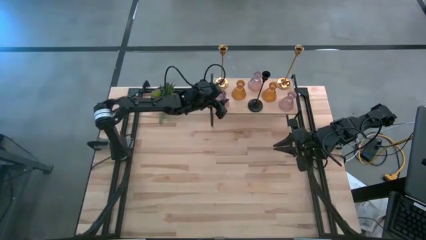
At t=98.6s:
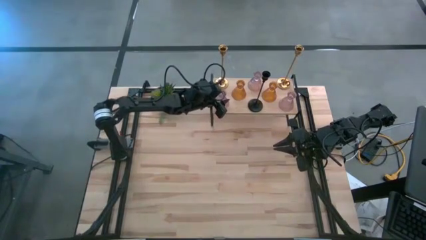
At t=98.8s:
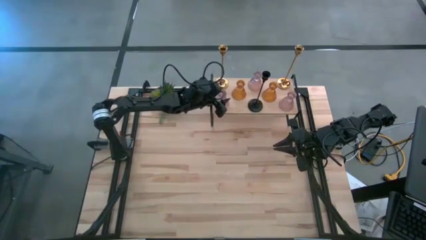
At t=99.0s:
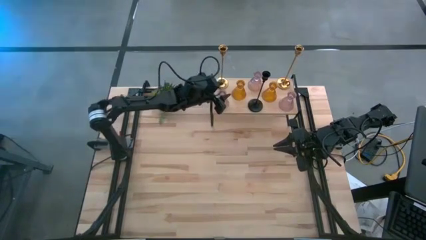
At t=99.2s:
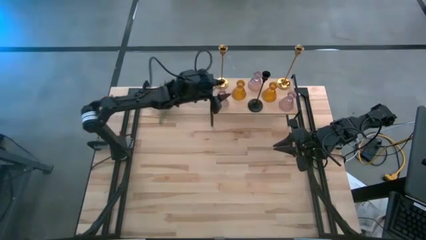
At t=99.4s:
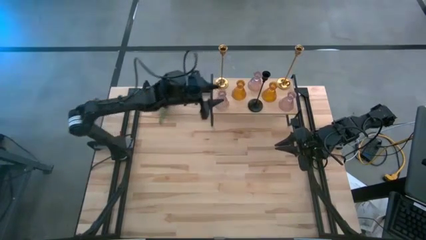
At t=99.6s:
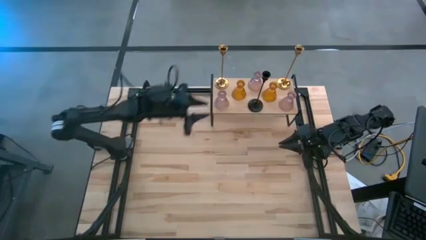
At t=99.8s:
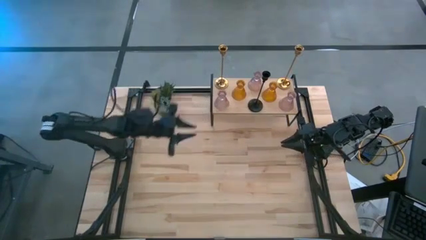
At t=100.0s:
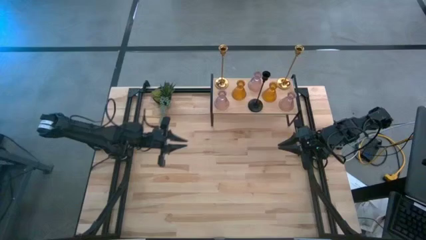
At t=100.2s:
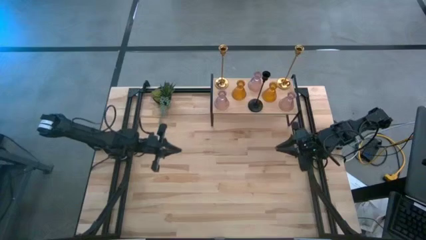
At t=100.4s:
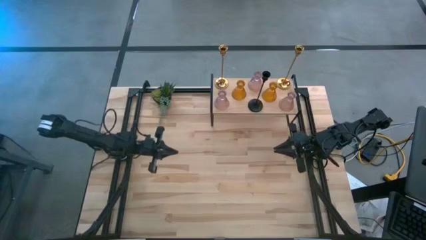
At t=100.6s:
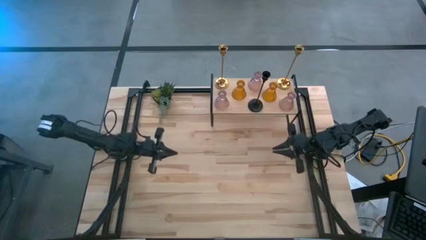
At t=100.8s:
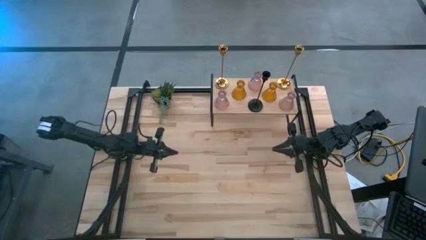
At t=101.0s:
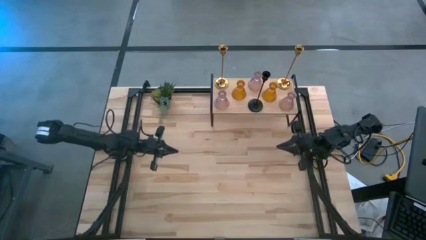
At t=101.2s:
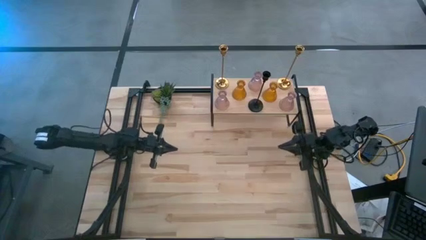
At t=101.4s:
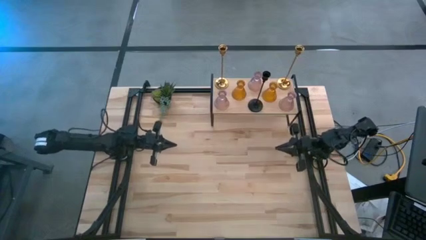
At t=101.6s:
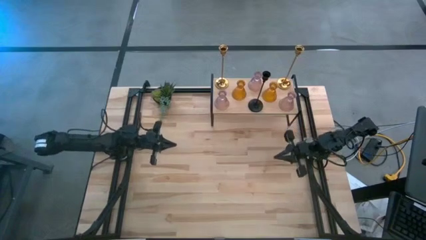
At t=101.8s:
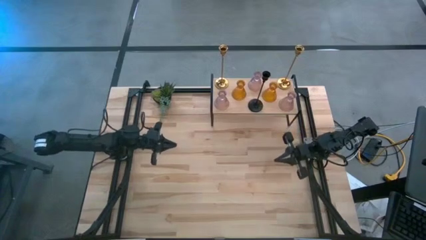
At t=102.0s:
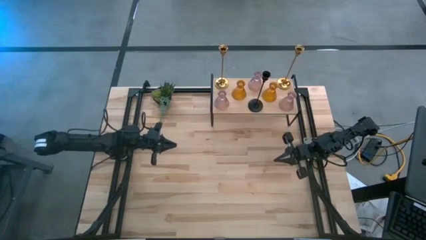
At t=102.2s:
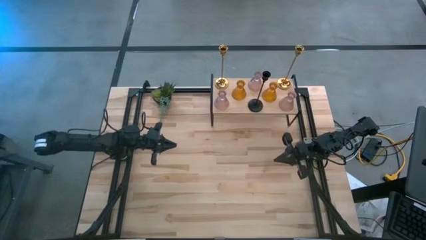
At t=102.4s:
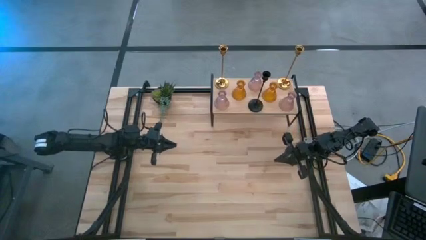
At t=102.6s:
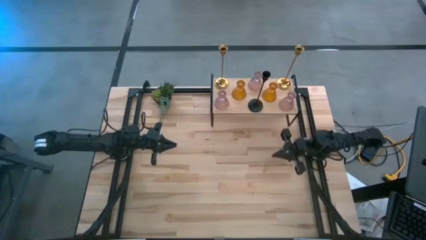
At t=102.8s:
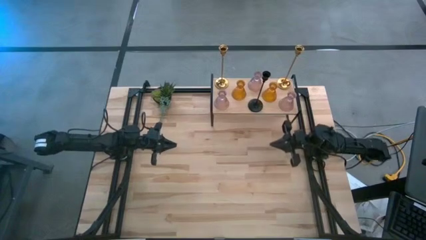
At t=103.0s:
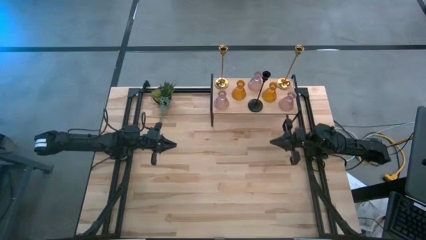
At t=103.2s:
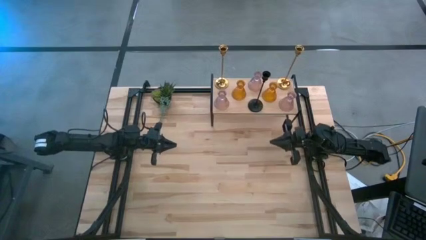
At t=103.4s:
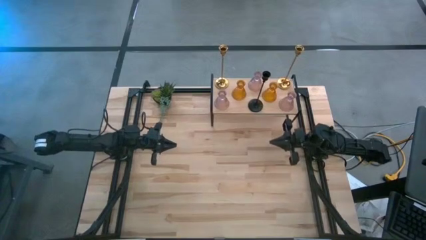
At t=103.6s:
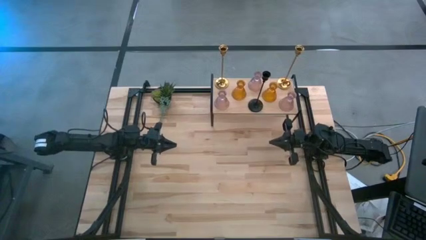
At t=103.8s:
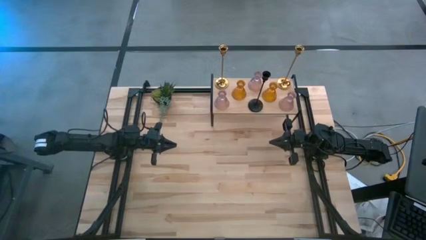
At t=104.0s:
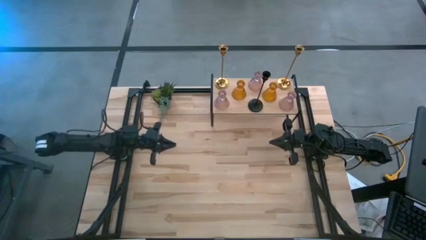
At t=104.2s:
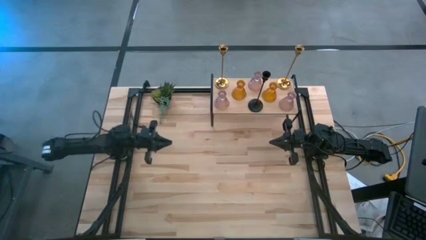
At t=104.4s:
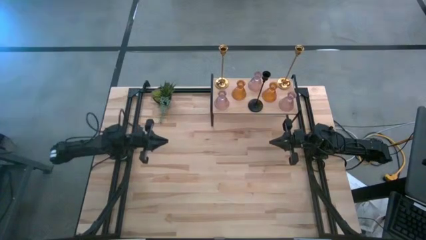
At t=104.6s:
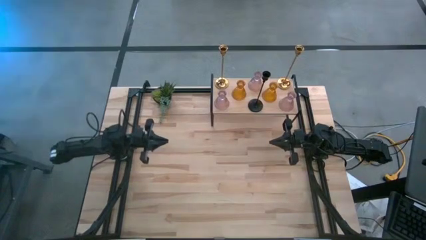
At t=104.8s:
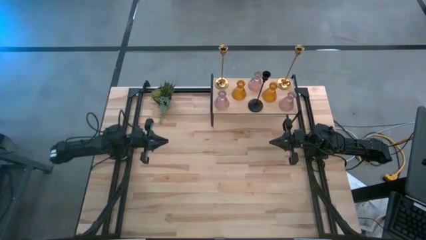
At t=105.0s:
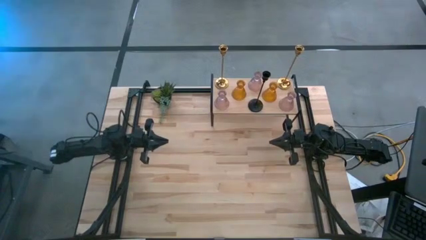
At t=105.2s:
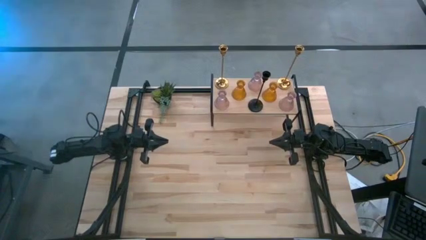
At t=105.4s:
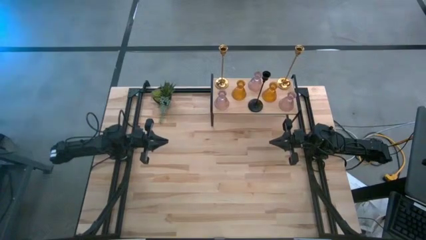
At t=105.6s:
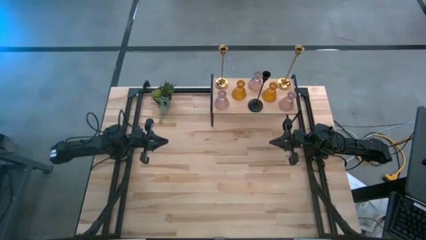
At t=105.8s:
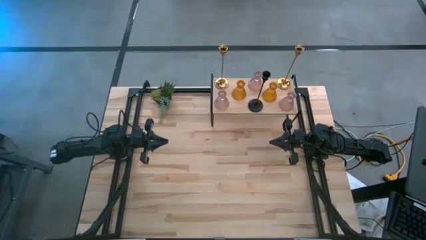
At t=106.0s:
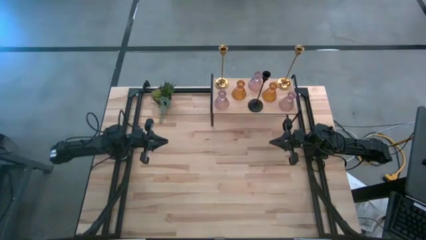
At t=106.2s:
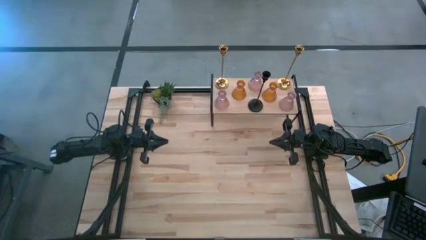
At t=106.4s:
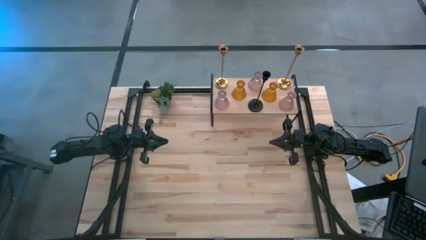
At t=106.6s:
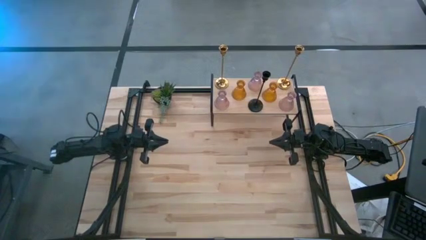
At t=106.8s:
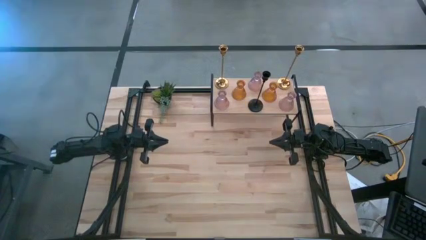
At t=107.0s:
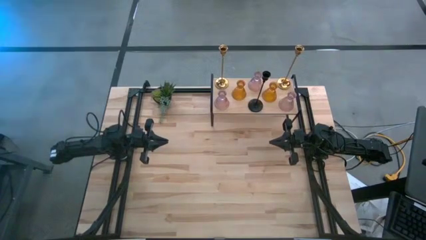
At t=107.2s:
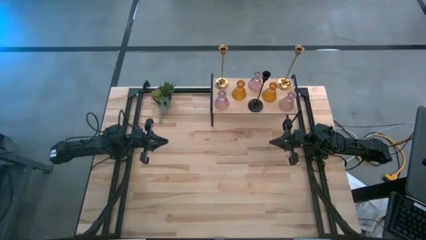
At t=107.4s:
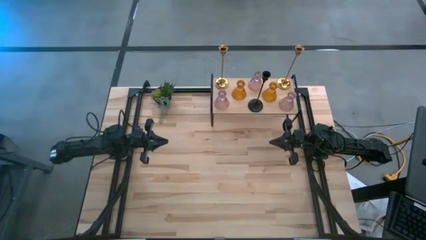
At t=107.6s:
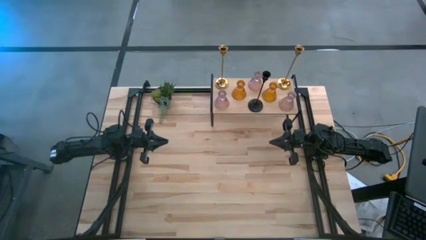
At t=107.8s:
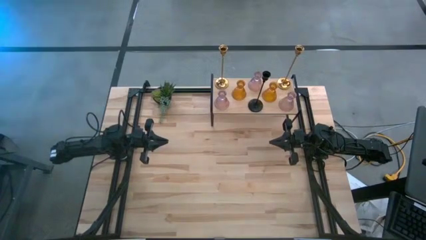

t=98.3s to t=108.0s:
Task: Pick & Place candle stick holders
Return to Home Position

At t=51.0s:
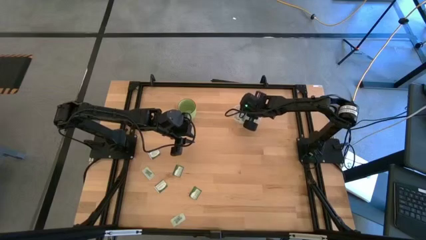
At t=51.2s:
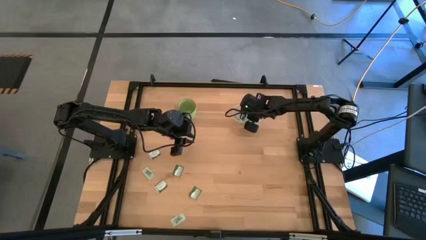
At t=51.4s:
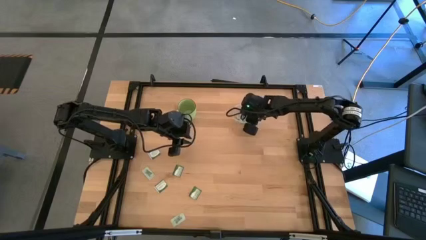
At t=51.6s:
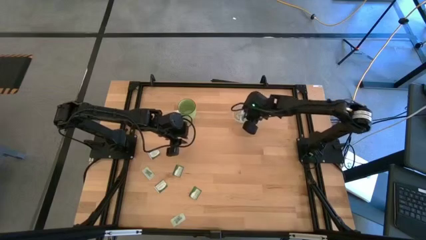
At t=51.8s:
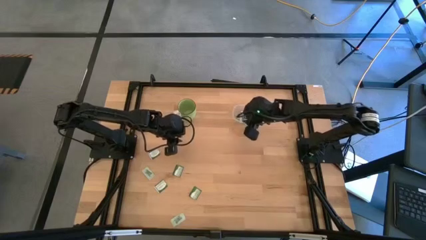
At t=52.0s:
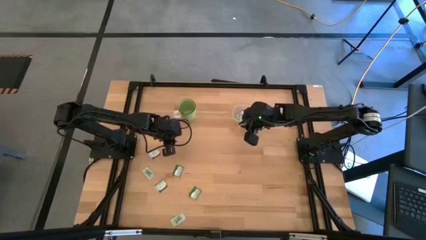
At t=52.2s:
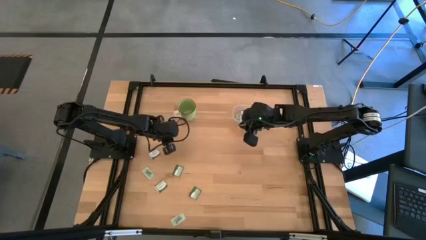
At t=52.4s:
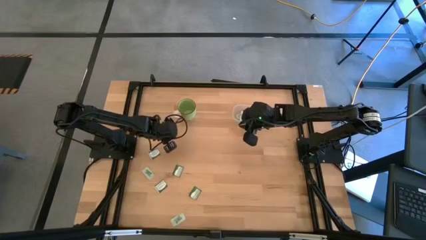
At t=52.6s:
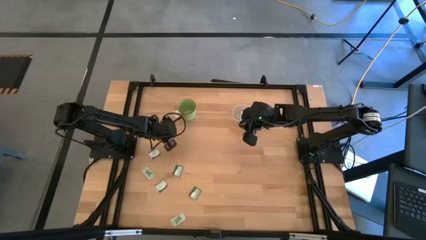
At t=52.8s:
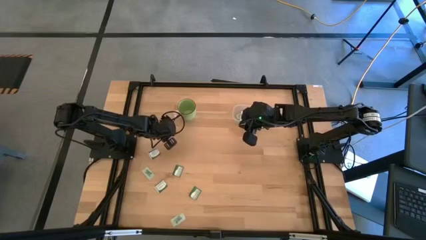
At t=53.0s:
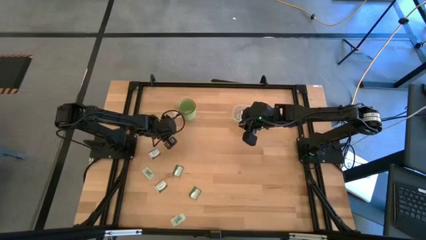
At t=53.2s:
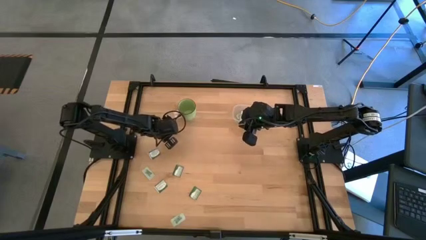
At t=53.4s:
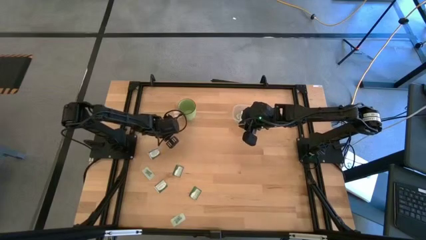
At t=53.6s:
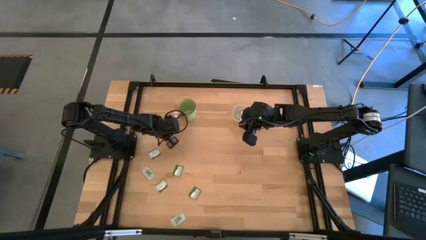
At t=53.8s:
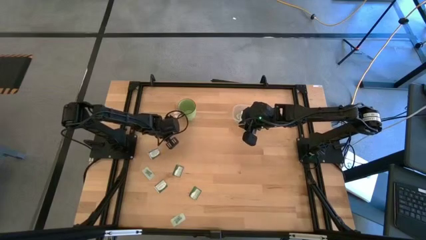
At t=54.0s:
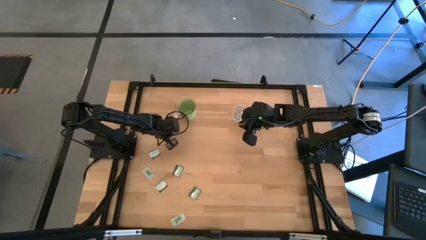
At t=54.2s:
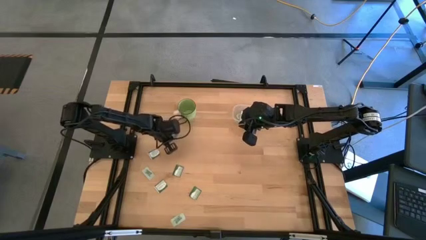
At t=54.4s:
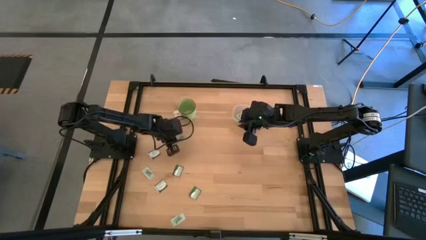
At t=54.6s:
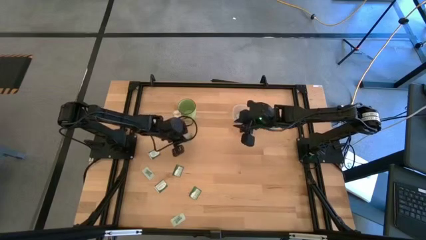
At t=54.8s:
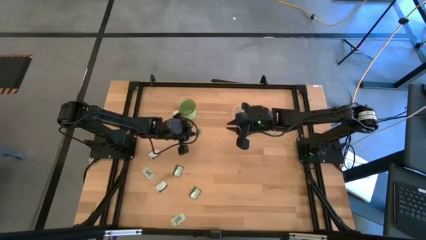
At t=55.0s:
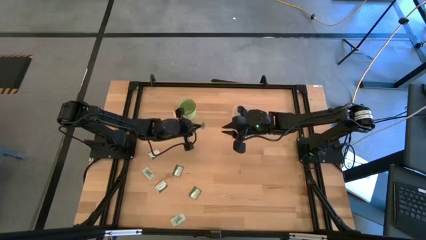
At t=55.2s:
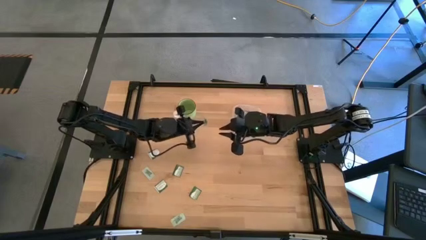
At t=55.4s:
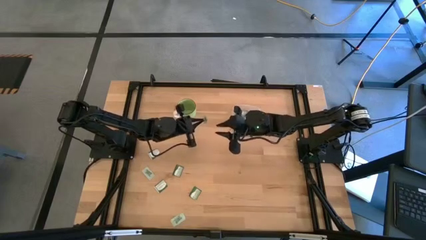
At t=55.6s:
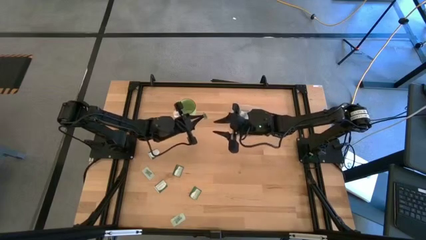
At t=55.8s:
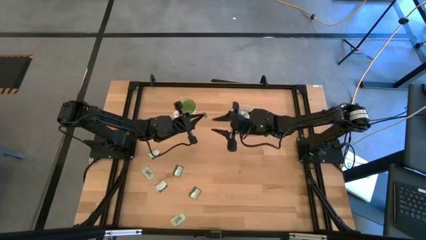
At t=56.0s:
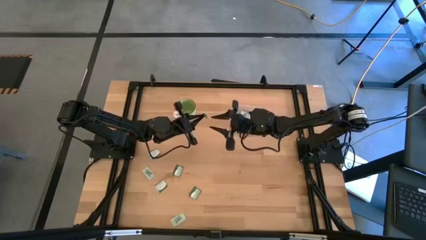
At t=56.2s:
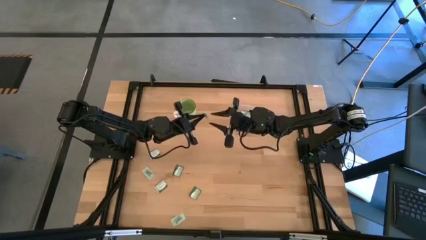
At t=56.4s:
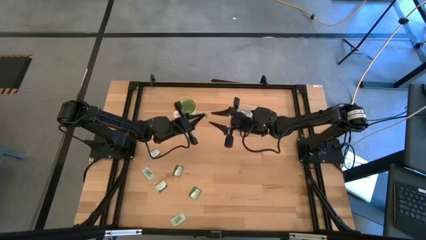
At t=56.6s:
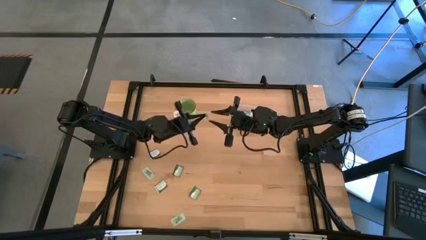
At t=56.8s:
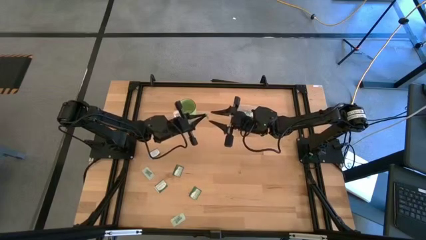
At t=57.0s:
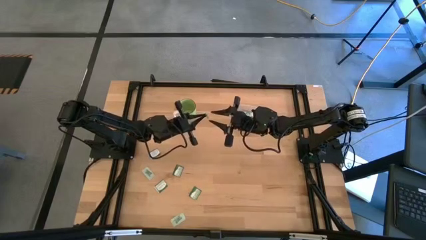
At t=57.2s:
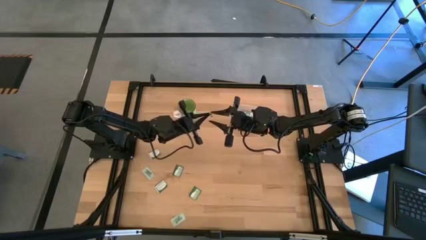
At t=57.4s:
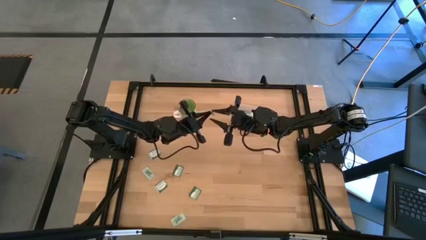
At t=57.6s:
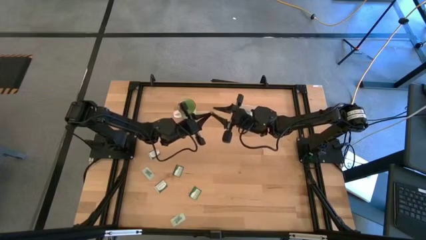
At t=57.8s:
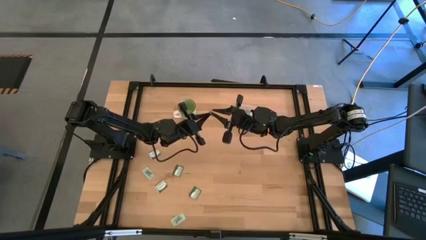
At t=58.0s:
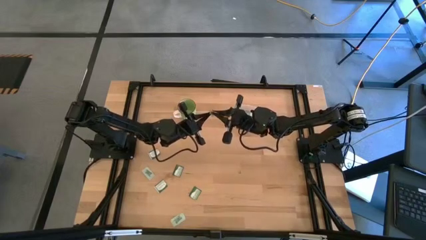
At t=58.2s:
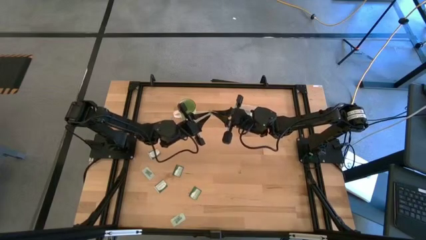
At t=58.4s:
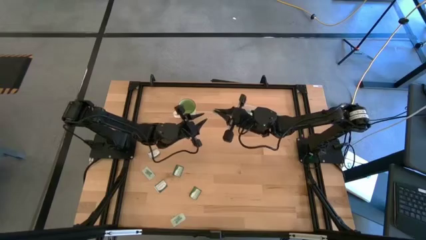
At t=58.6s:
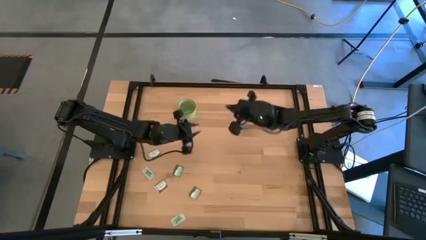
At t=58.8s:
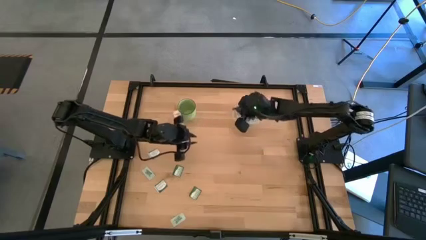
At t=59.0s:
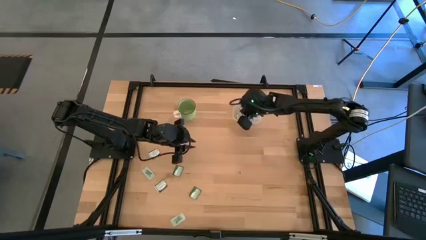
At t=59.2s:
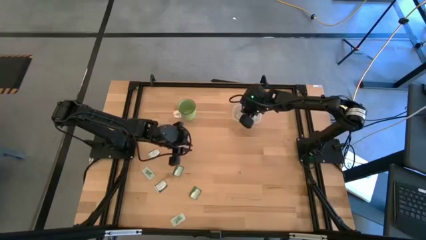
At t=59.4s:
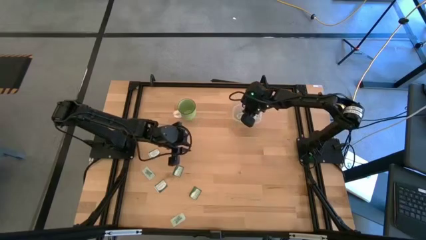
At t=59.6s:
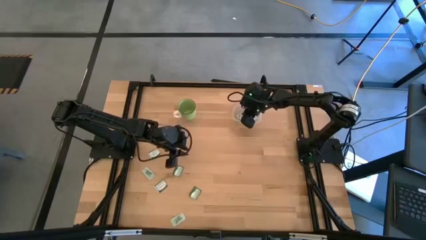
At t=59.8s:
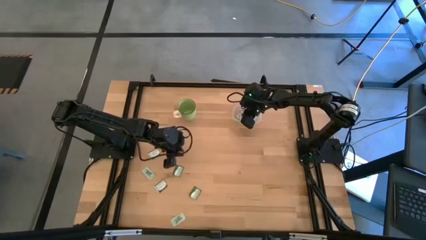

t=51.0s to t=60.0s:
Task: Pick and place items into bin
Put the white stevia packet into the transparent bin
